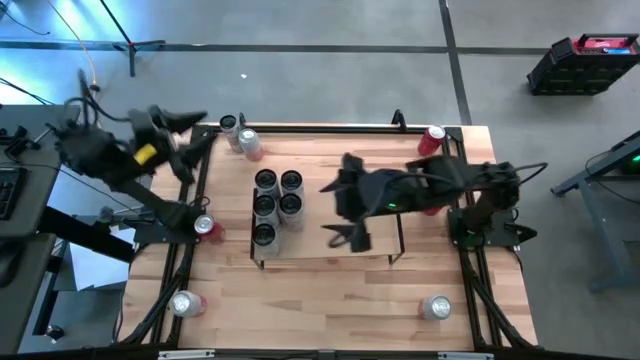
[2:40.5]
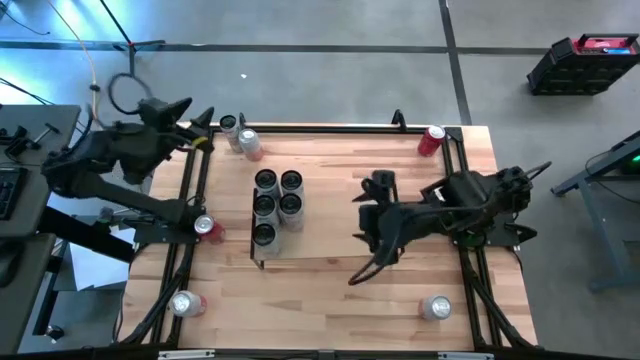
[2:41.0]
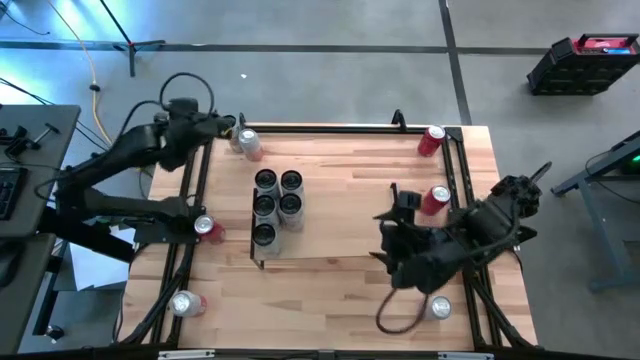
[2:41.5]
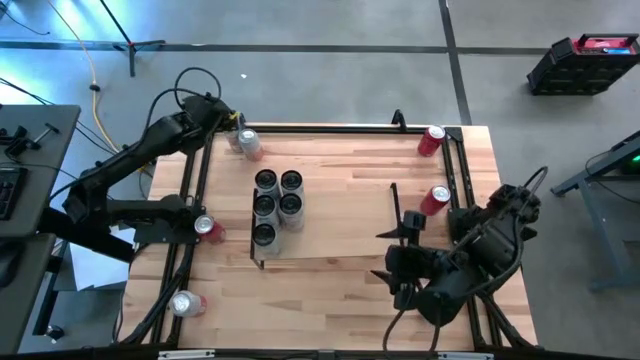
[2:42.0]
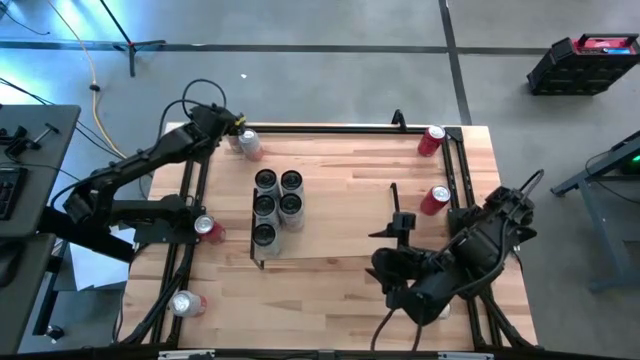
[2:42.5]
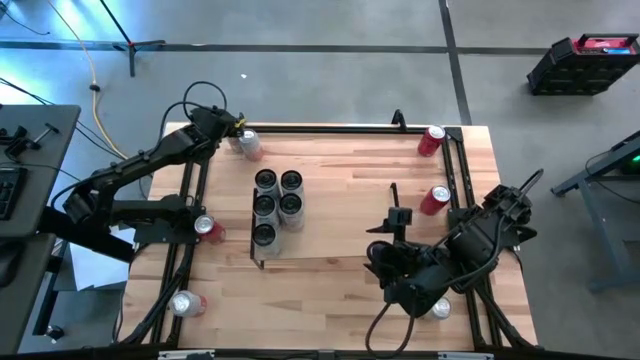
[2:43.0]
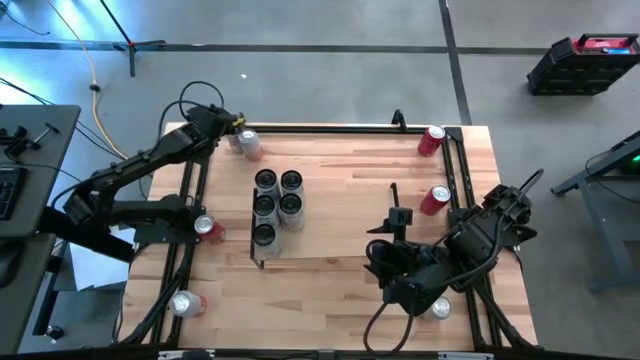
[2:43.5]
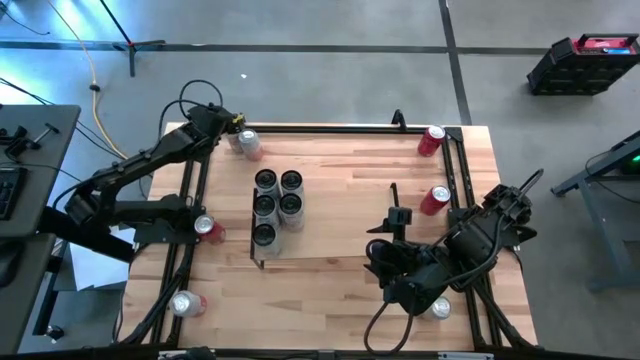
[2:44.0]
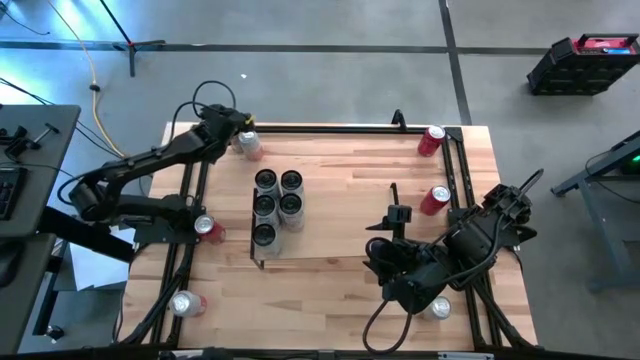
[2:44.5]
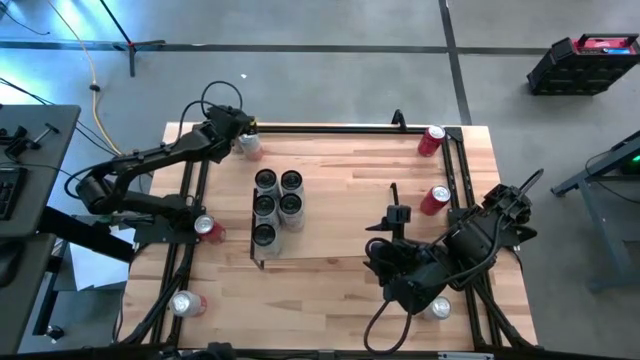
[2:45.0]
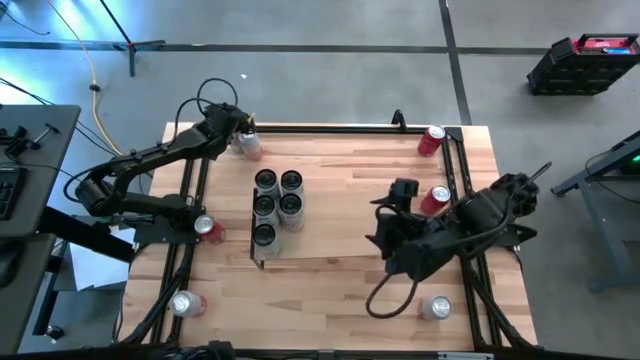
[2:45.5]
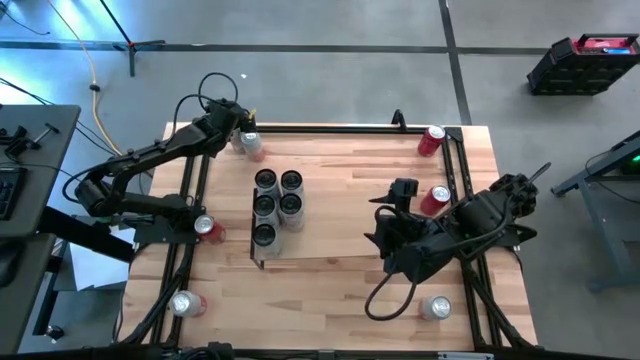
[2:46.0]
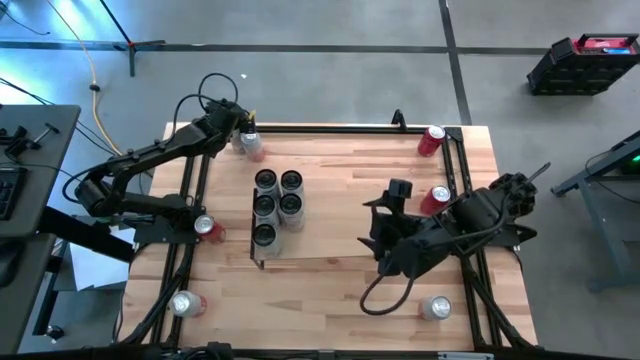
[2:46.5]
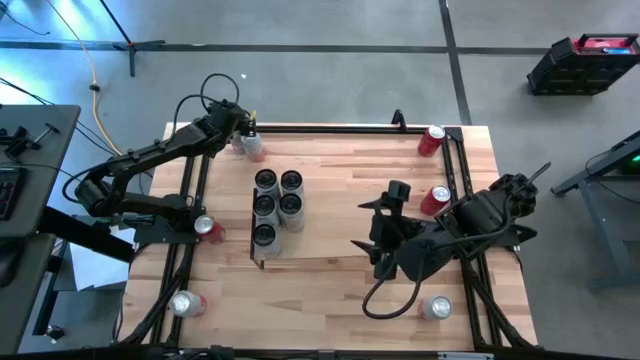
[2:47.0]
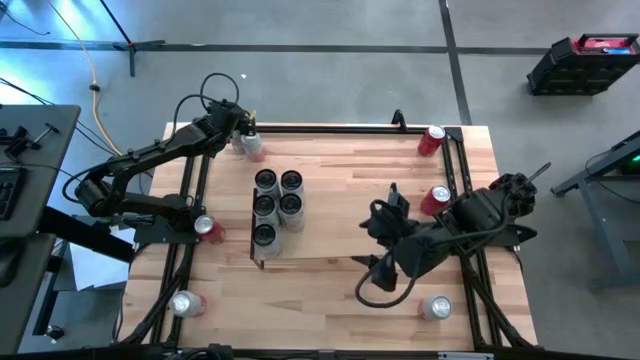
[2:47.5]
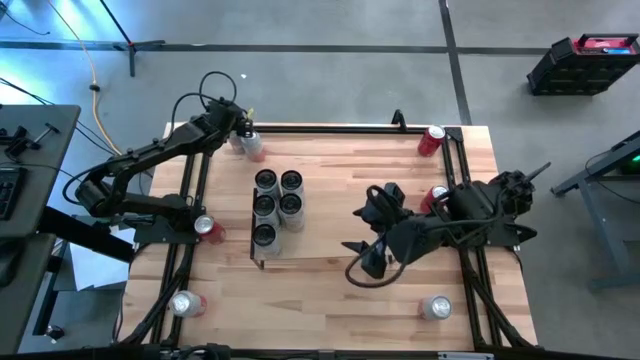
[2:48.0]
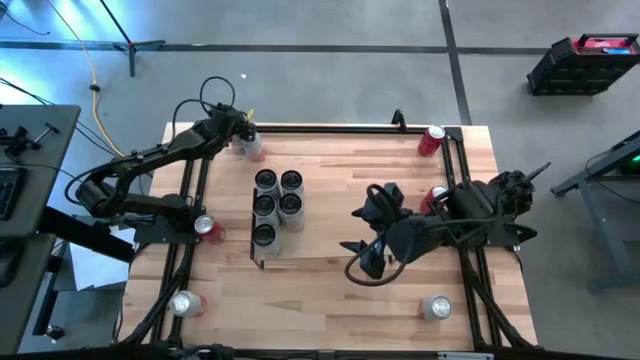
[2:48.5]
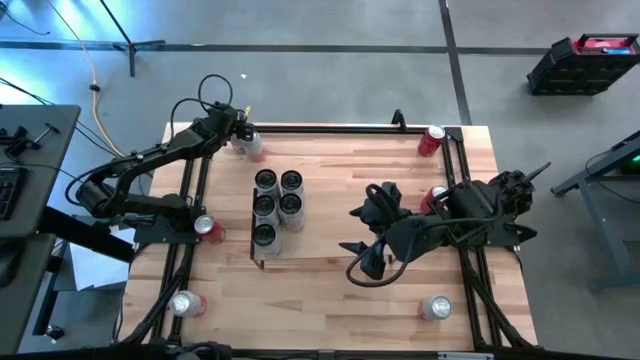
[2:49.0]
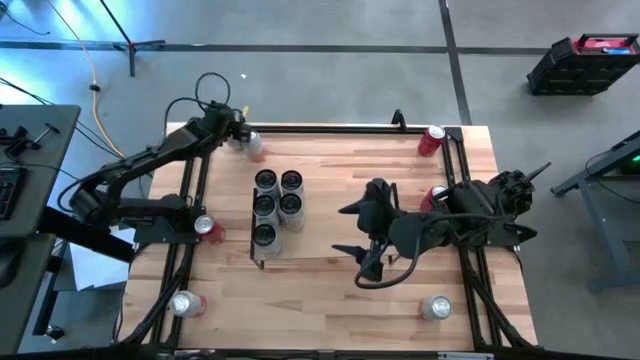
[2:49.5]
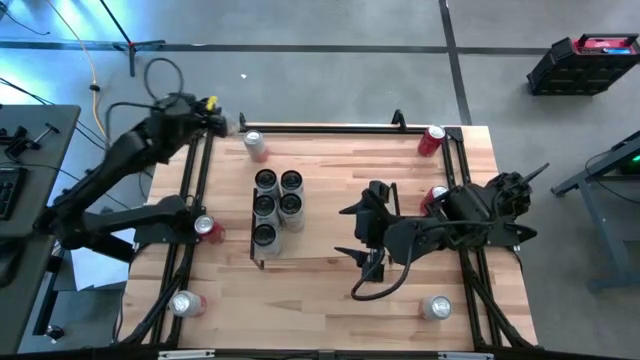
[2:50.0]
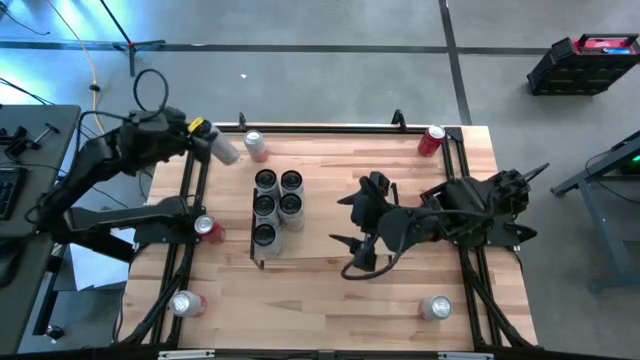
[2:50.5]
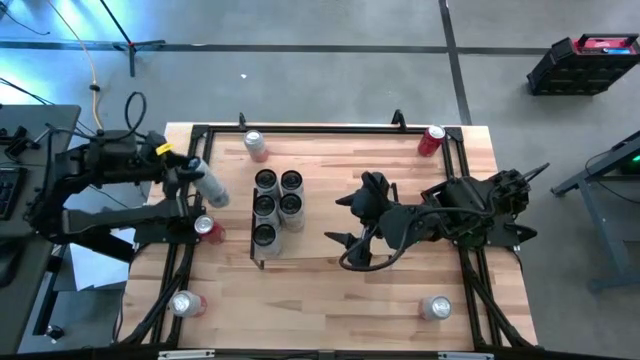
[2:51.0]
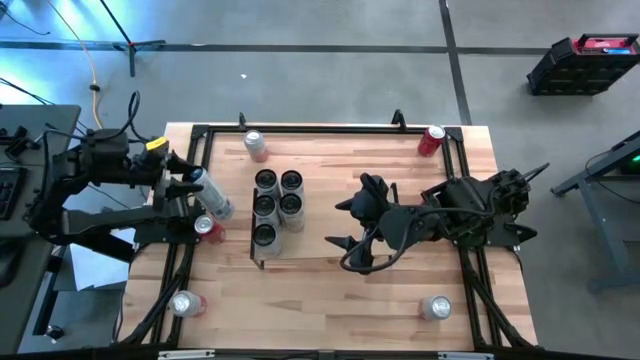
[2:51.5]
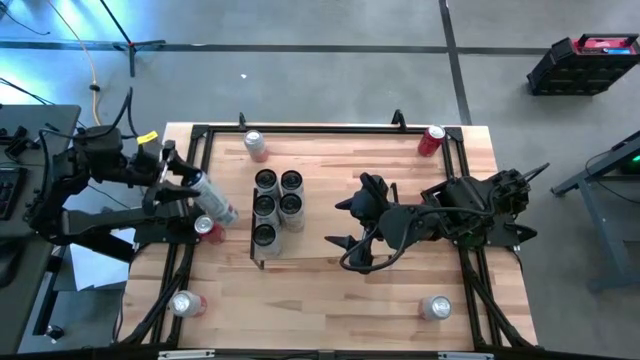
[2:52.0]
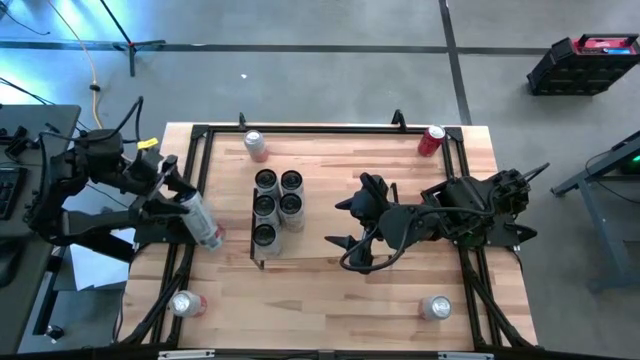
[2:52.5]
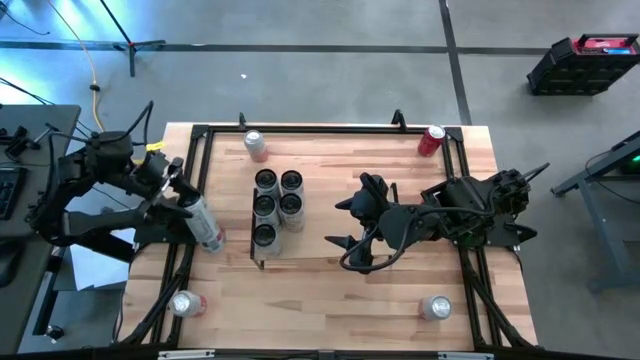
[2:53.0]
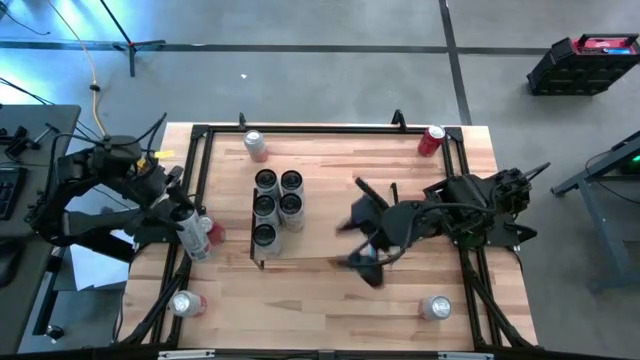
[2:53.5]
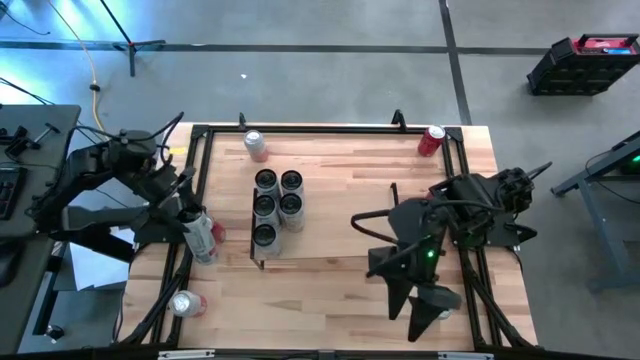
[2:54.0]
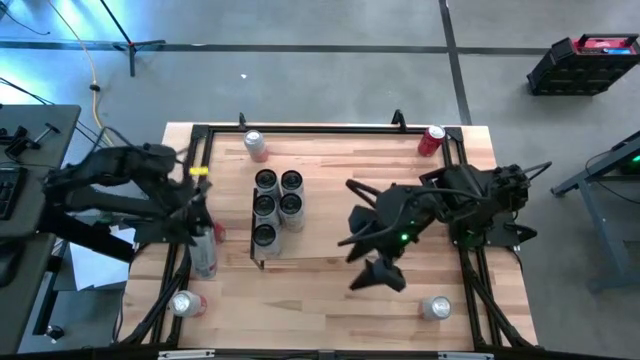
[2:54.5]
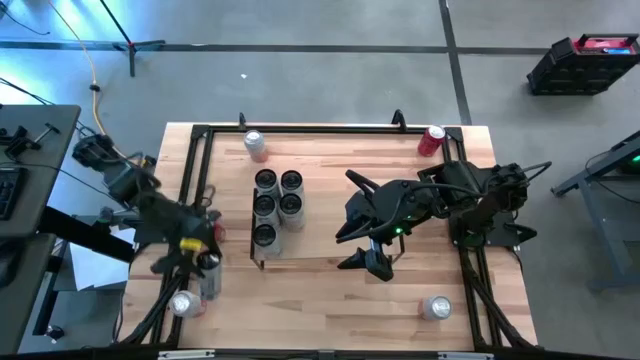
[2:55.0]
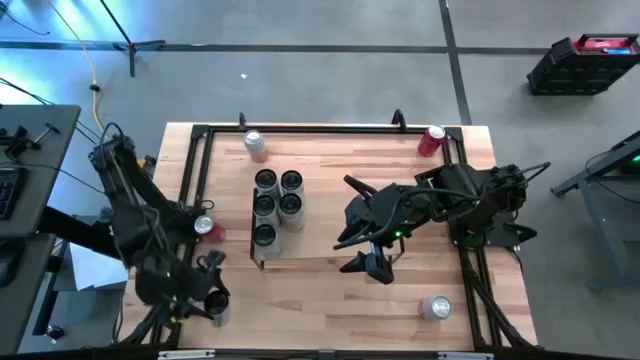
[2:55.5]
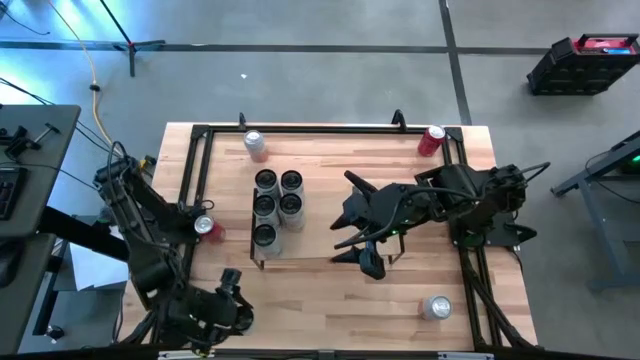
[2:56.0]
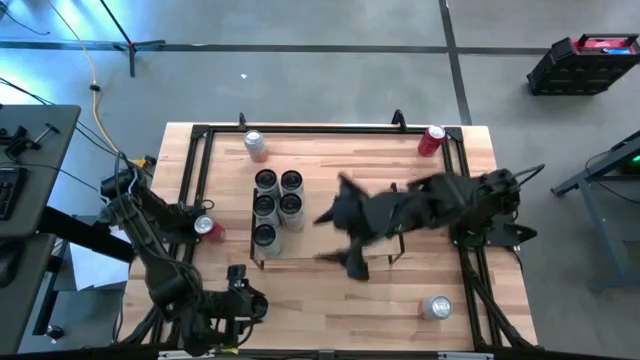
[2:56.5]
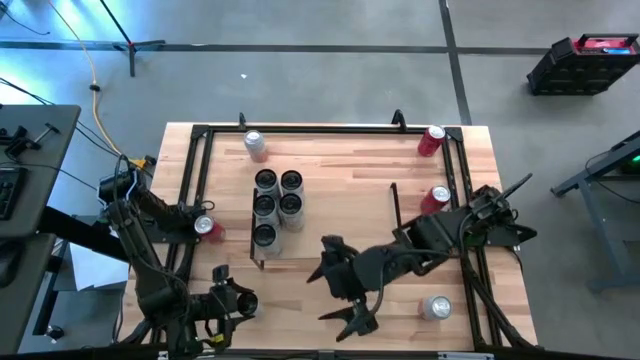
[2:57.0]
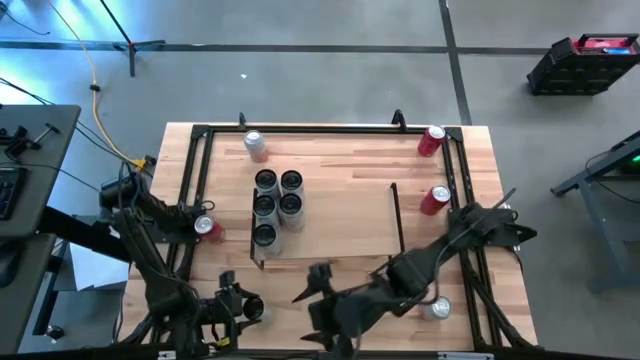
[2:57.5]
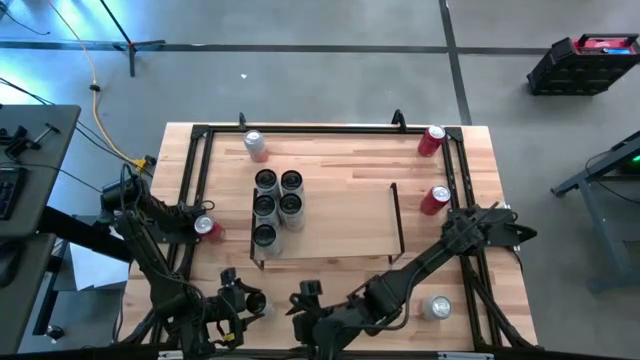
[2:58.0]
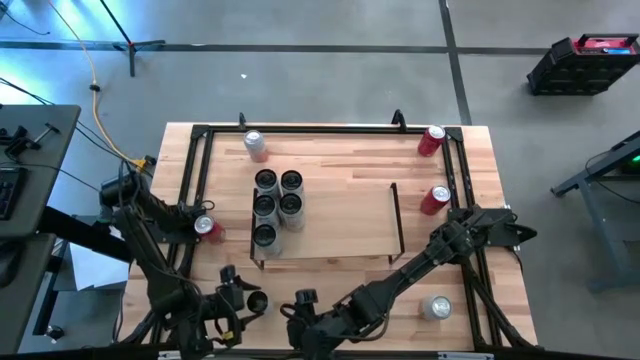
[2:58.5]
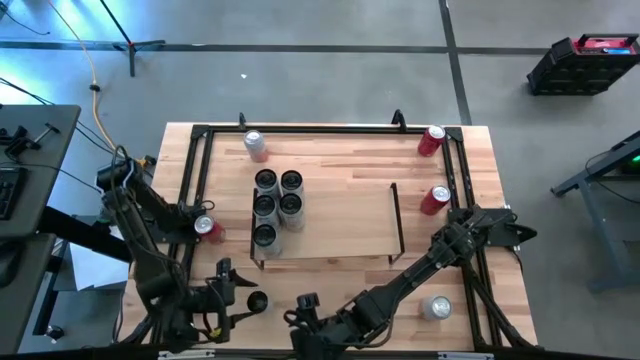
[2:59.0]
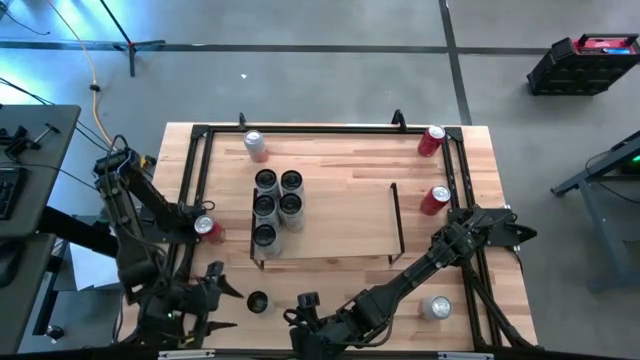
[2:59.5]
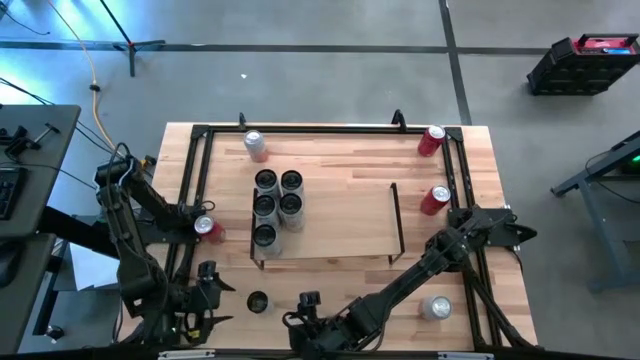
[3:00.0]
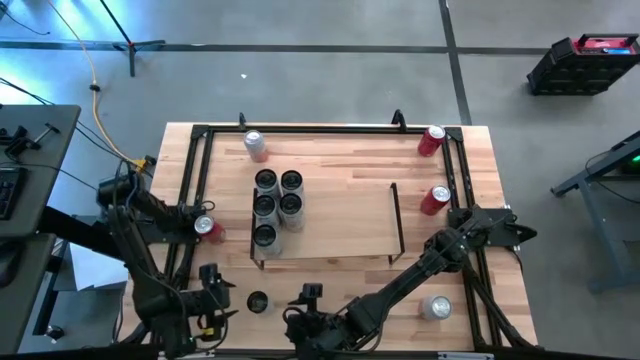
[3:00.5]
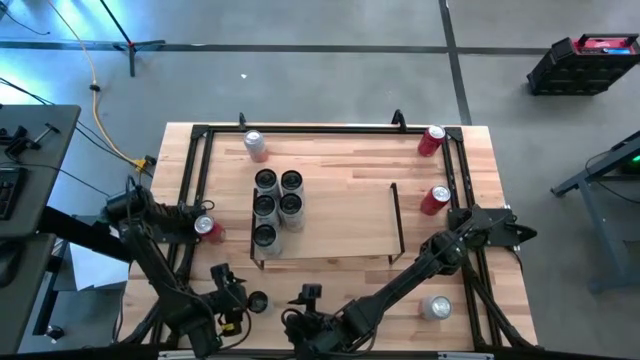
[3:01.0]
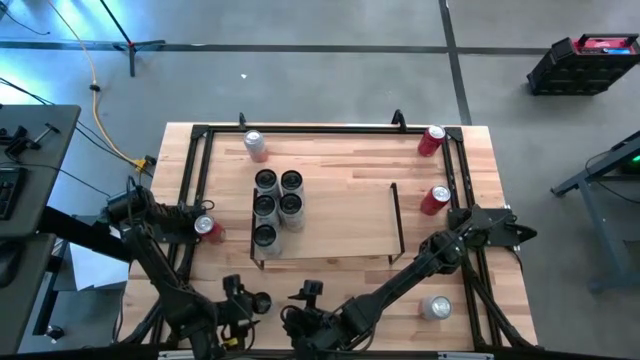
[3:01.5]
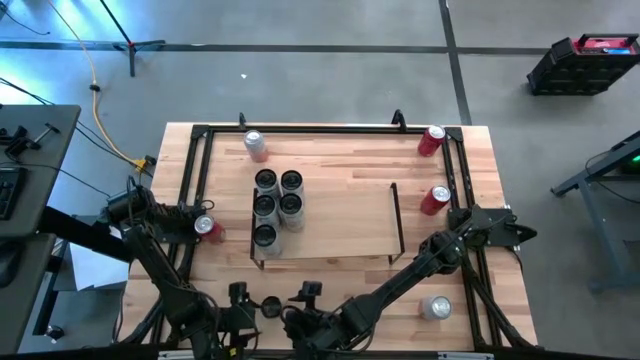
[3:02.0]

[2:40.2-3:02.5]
Task: Place canned beverage on shelf
Put the white pink soda can aligned with the other white pink soda cans on the shelf
